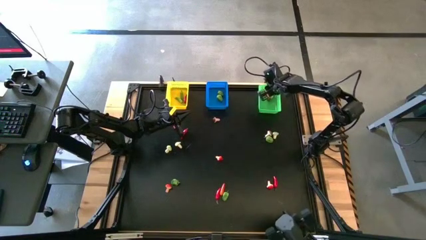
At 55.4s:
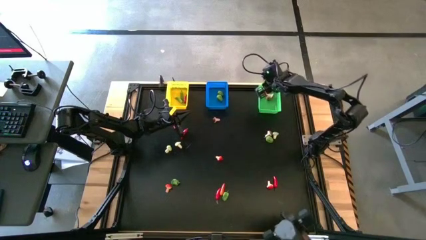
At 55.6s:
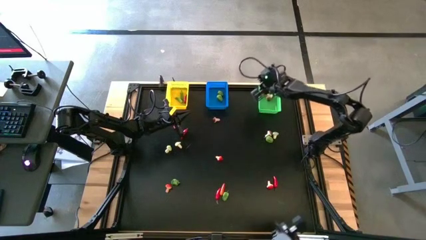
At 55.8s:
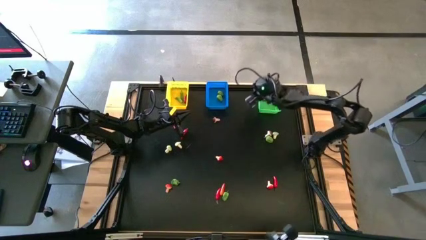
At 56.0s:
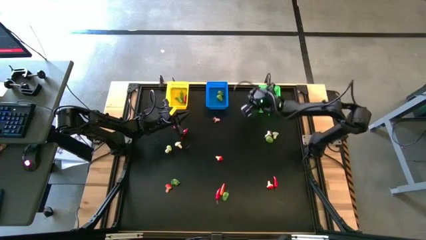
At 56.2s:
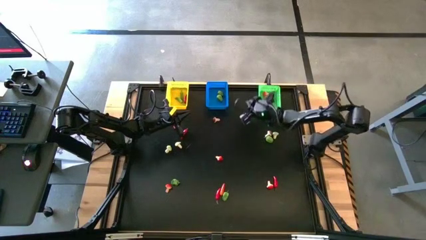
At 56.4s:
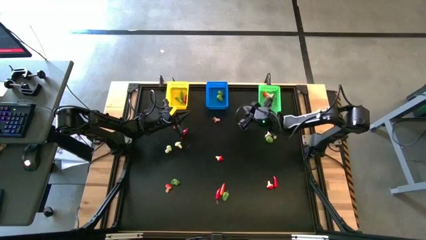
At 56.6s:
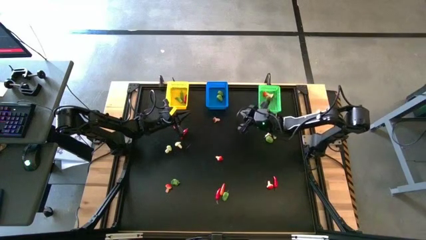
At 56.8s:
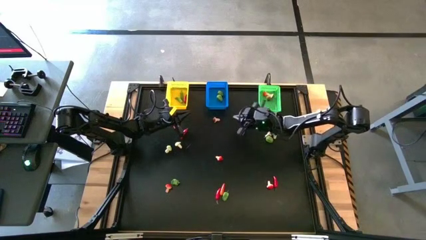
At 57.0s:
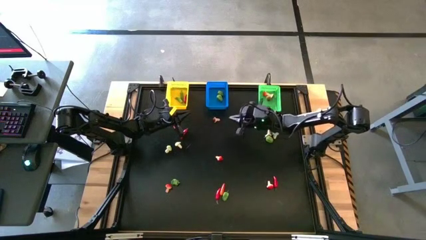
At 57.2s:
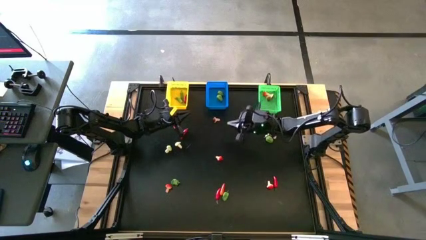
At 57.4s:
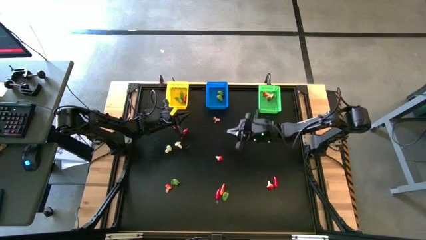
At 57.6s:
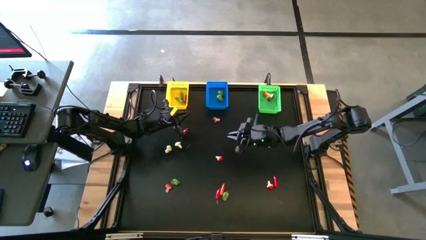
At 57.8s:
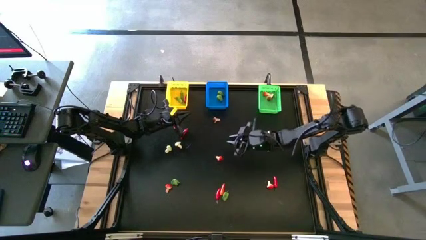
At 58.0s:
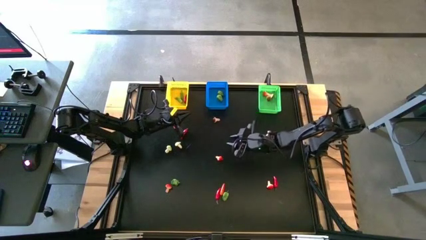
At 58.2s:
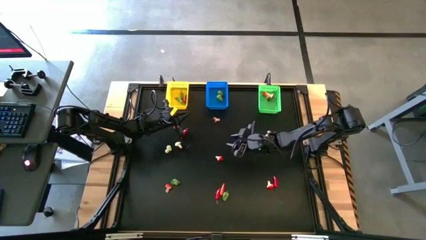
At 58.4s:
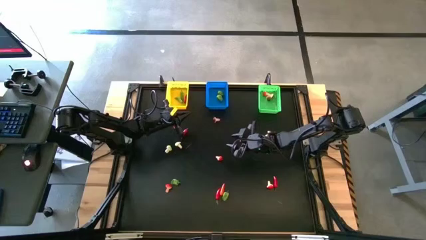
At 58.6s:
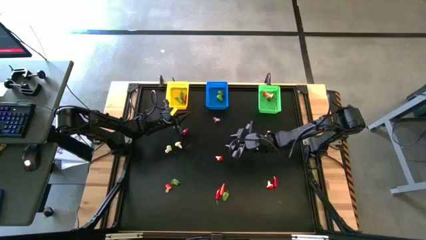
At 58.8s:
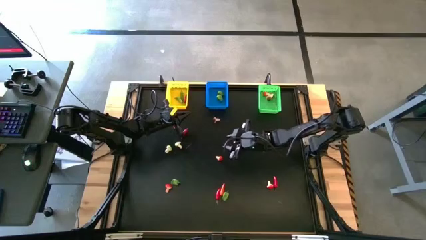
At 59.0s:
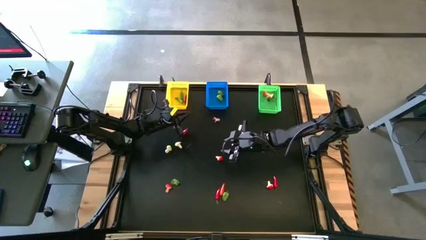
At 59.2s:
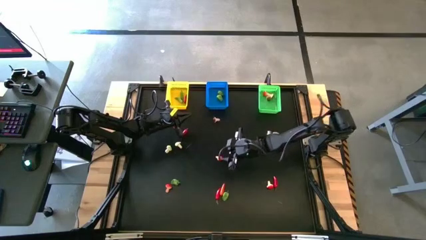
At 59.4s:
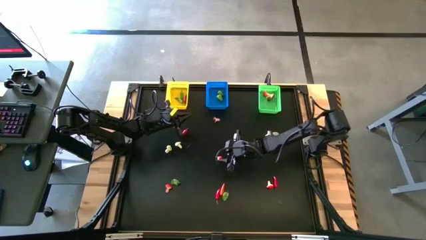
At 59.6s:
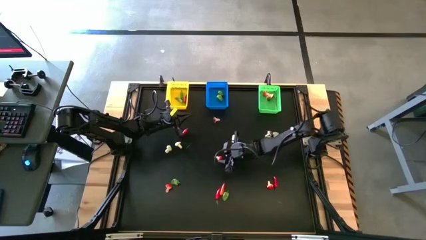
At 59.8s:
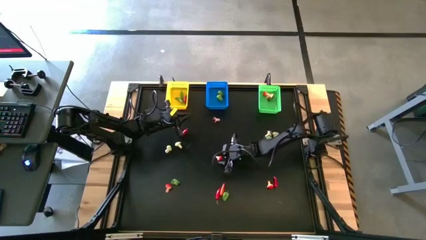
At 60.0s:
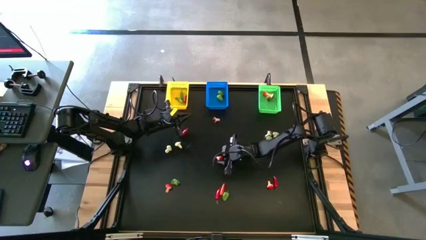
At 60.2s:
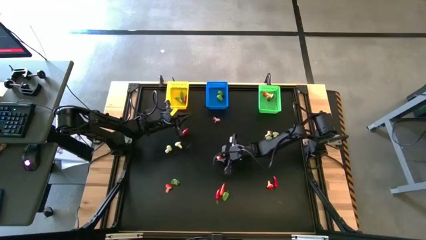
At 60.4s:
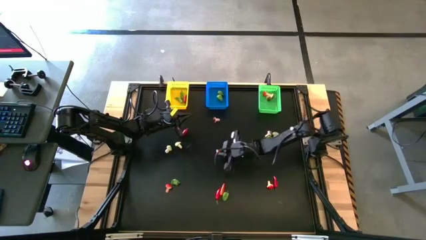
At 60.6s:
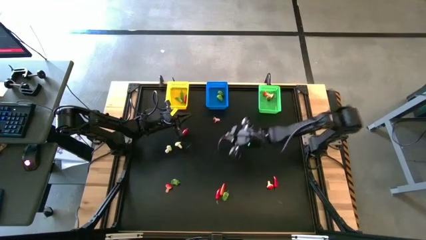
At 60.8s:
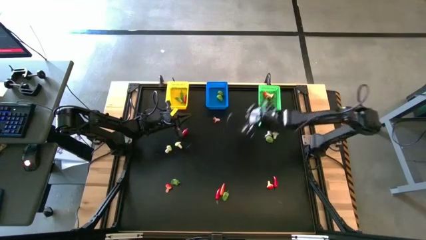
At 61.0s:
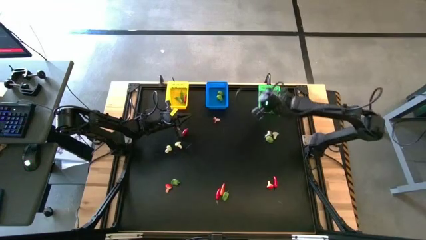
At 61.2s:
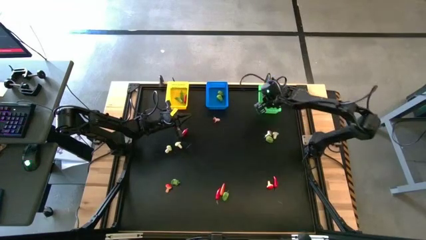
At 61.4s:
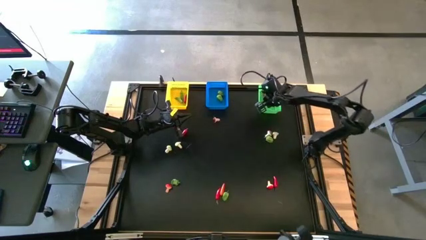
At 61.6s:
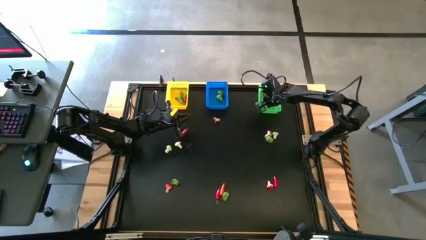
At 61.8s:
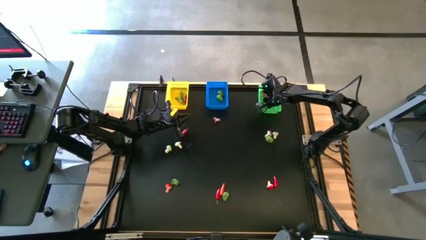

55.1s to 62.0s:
Task: Sort produce into baskets
Put the orange mushroom into the green bin

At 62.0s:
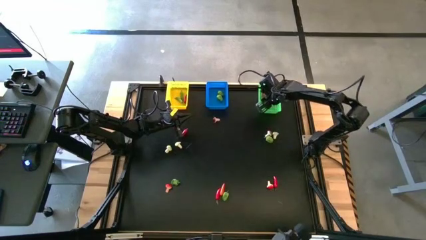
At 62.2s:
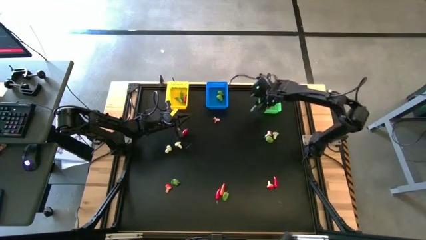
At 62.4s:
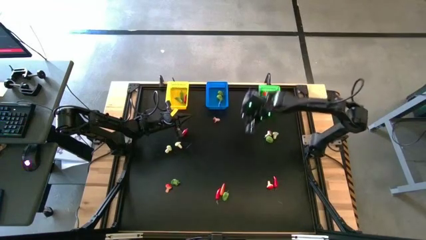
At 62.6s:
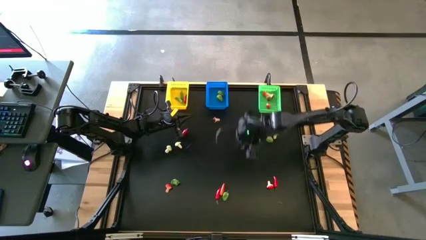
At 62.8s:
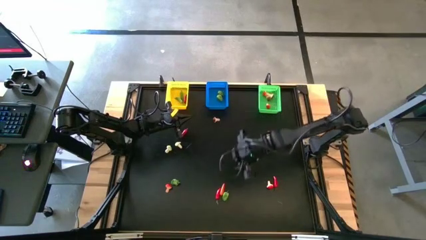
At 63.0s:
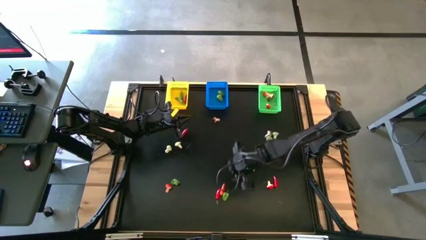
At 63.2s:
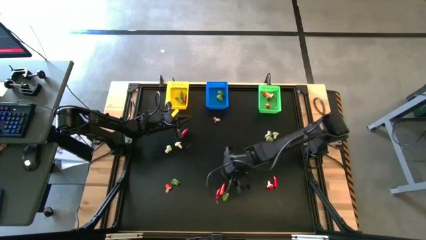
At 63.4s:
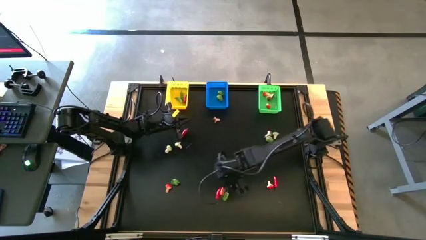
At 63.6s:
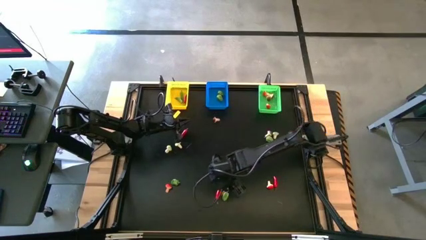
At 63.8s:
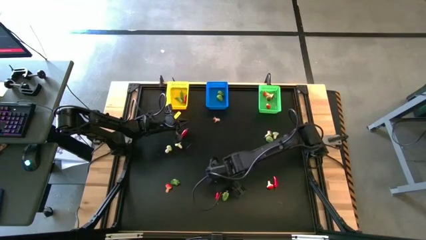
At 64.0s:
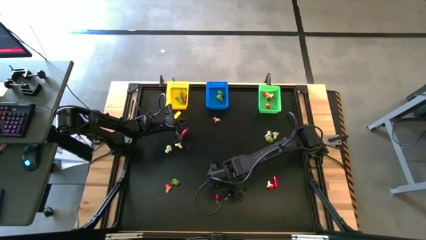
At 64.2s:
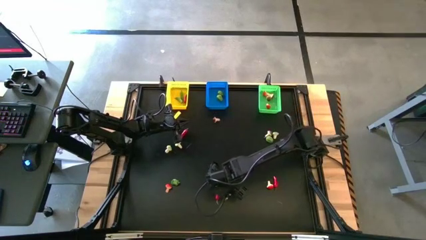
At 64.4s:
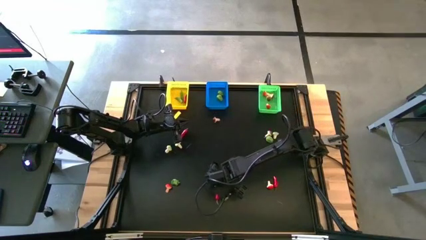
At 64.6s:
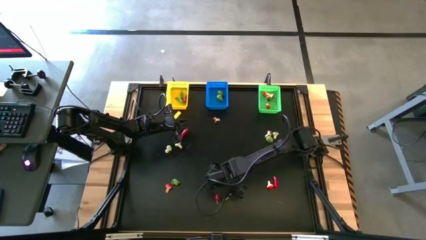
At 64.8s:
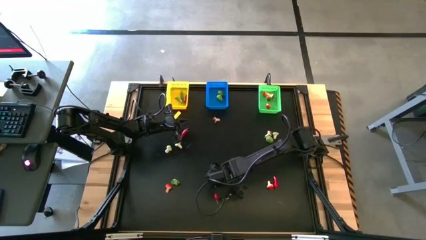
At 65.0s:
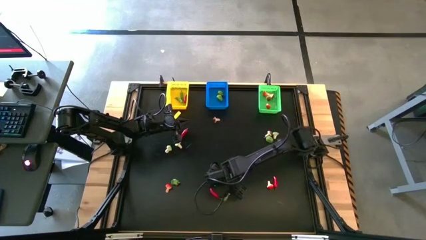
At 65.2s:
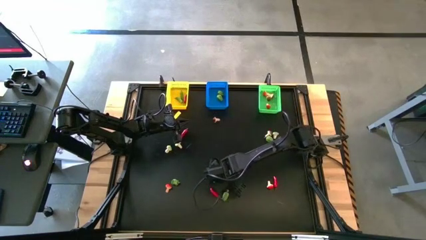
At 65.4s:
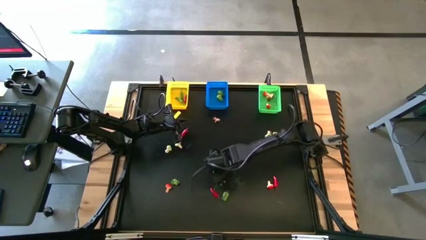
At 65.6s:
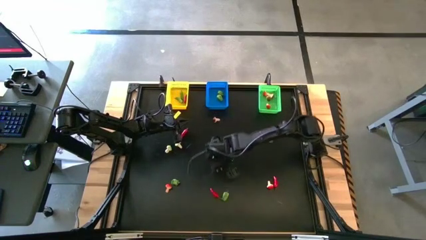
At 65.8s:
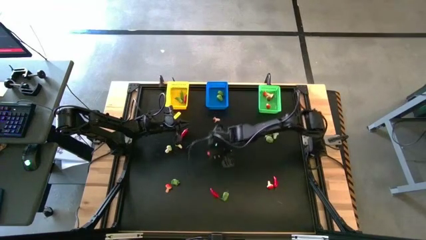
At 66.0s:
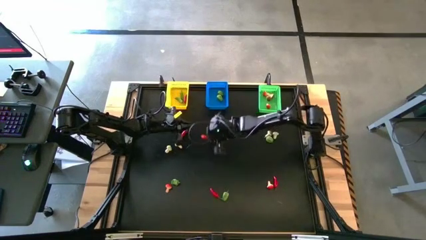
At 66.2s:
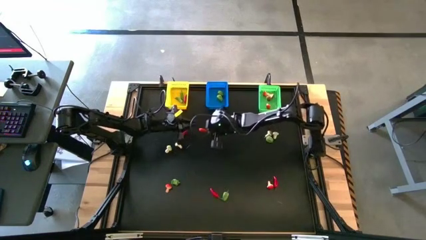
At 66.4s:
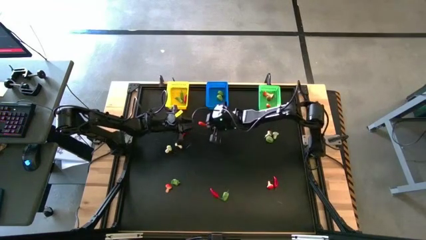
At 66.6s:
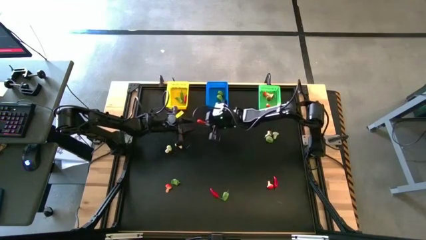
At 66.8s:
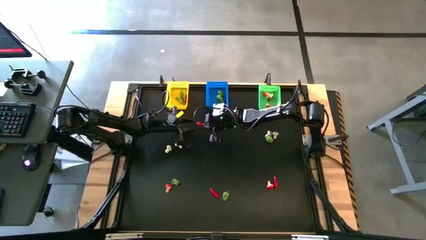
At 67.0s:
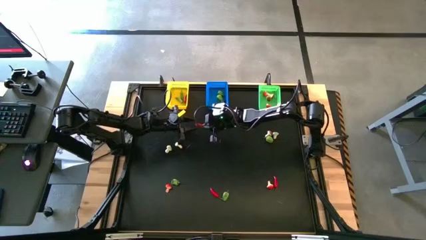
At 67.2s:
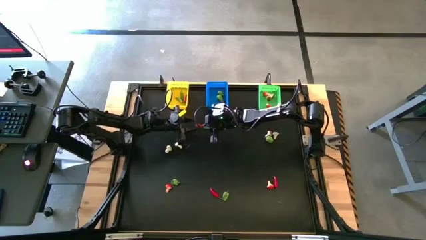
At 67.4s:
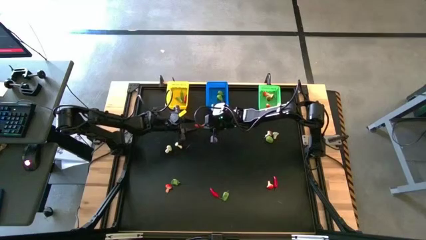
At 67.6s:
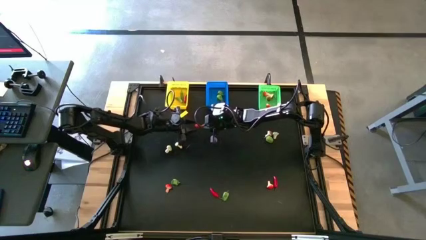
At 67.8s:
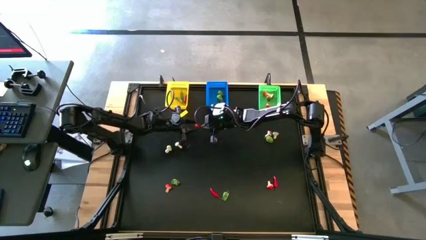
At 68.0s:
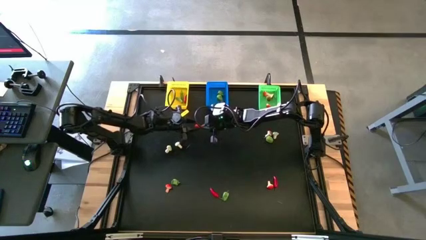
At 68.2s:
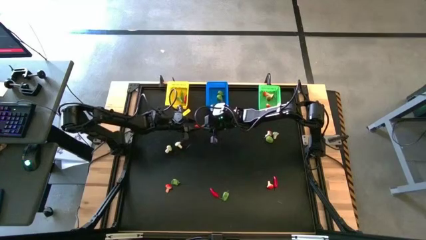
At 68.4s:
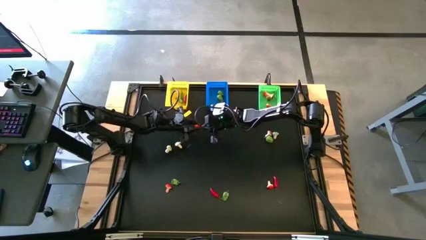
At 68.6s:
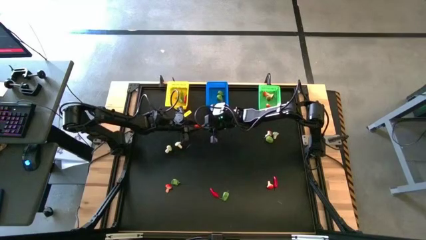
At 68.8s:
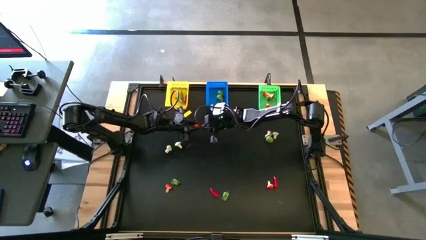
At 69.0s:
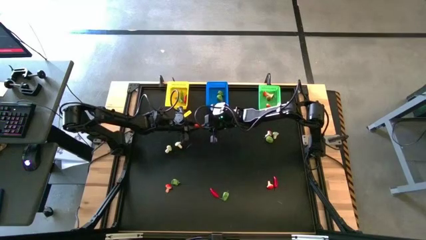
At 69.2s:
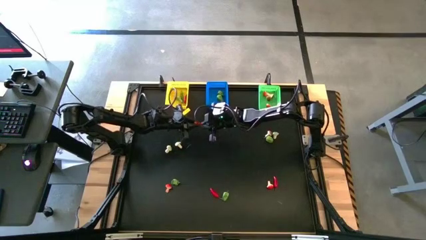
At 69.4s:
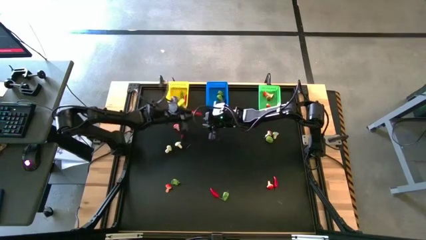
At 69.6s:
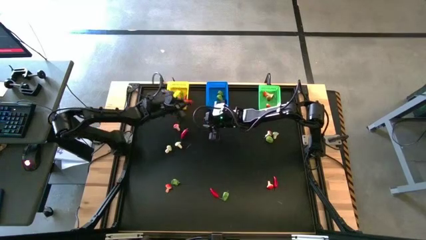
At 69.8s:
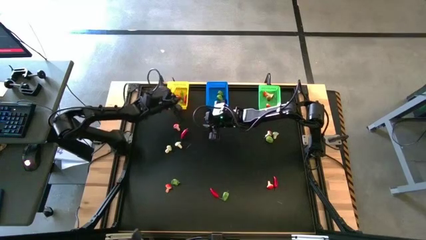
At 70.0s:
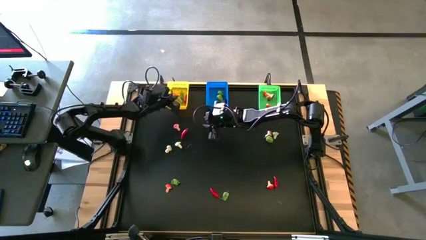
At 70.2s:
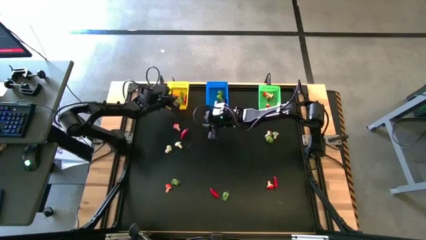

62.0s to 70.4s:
Put the orange chili pepper into the yellow bin

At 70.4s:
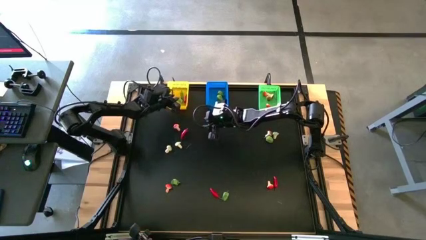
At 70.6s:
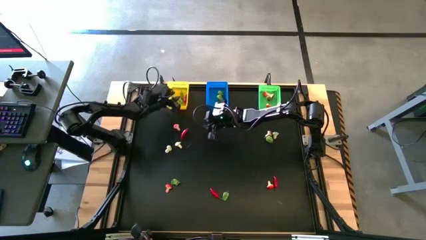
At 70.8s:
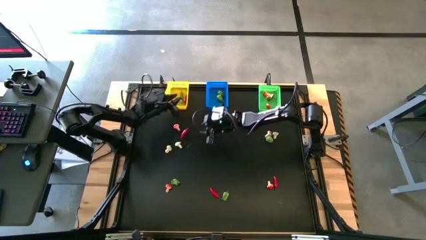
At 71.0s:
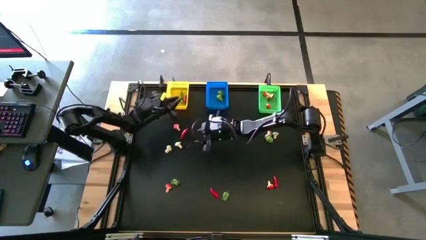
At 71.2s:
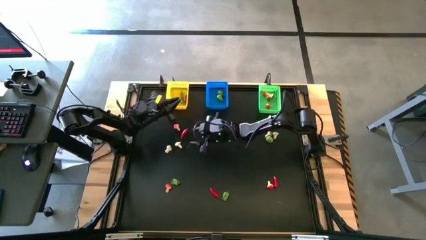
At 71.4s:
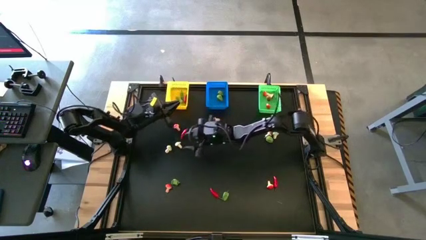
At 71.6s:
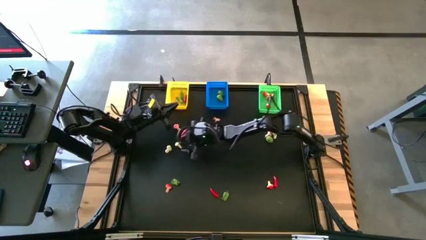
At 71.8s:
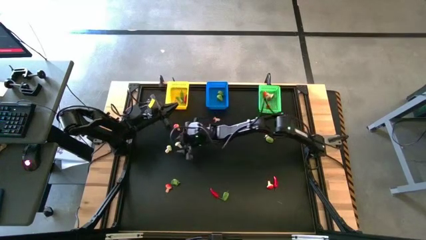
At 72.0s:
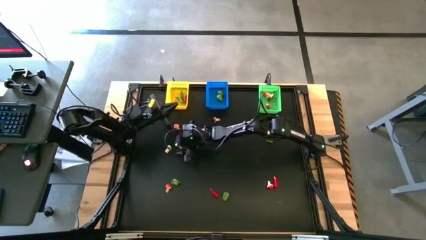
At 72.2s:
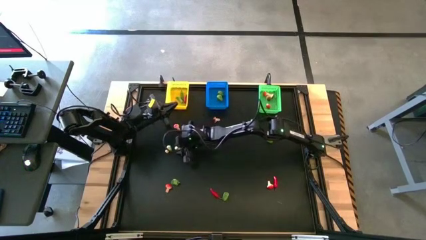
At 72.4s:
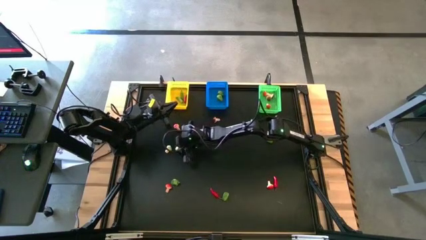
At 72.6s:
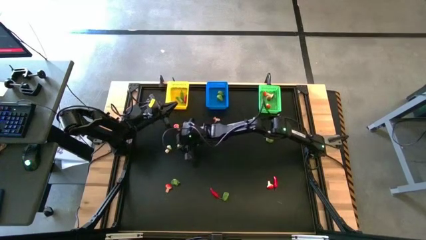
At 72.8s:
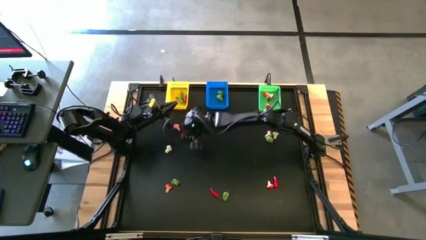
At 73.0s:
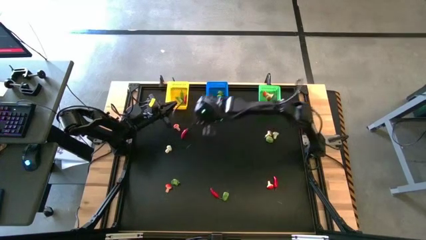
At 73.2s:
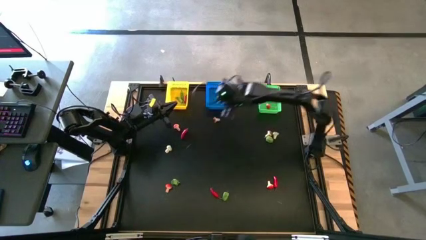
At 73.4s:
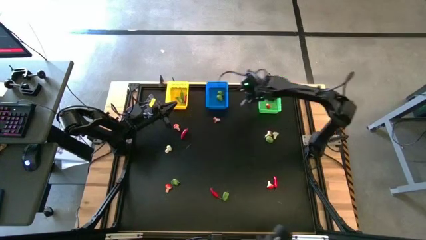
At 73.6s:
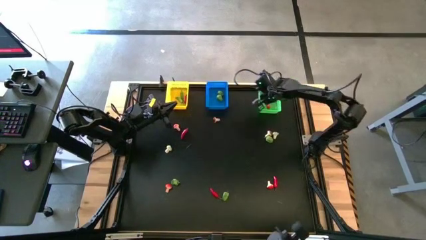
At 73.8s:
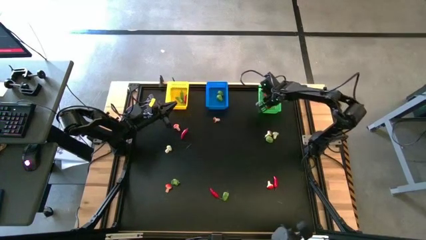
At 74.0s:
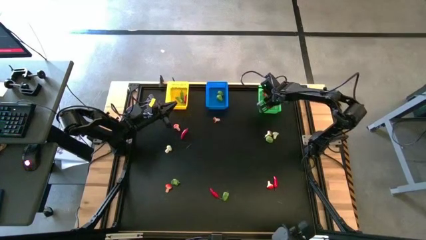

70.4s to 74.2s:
Put the green mushroom into the green bin
